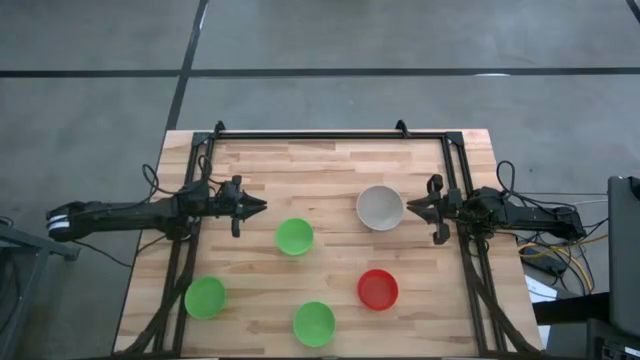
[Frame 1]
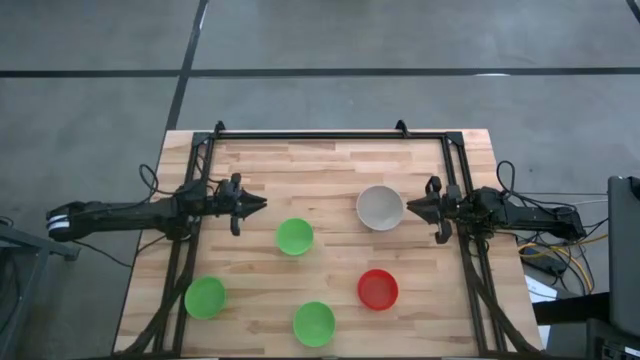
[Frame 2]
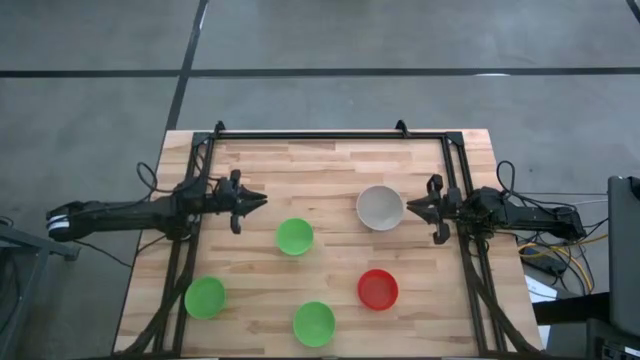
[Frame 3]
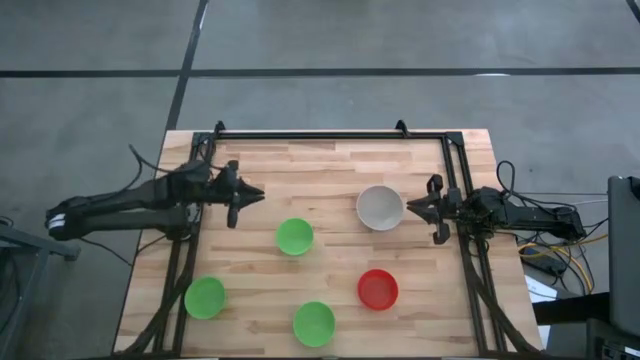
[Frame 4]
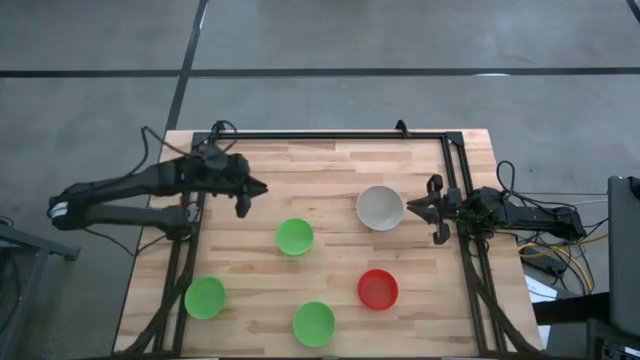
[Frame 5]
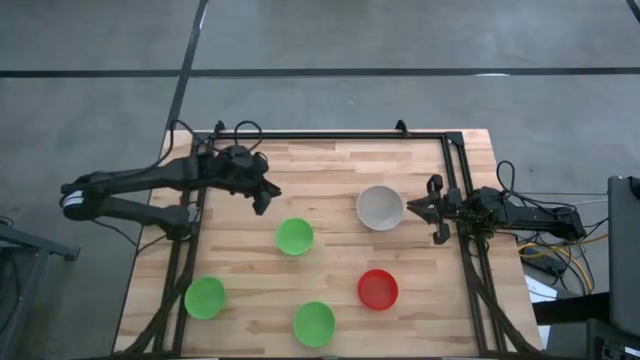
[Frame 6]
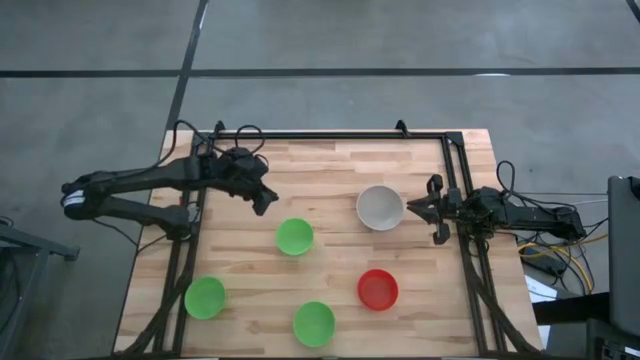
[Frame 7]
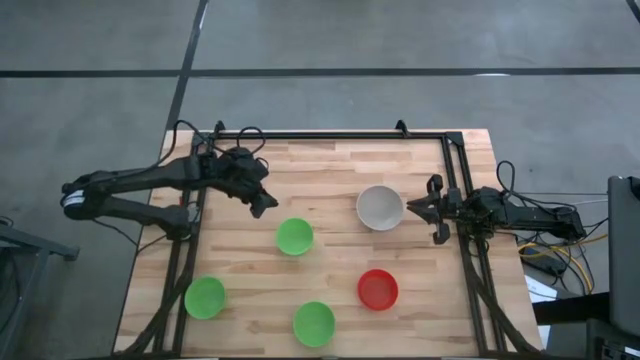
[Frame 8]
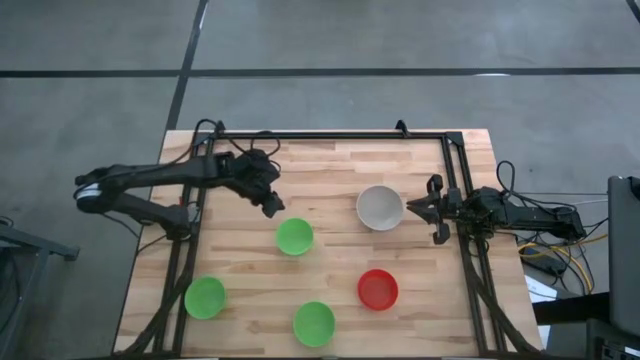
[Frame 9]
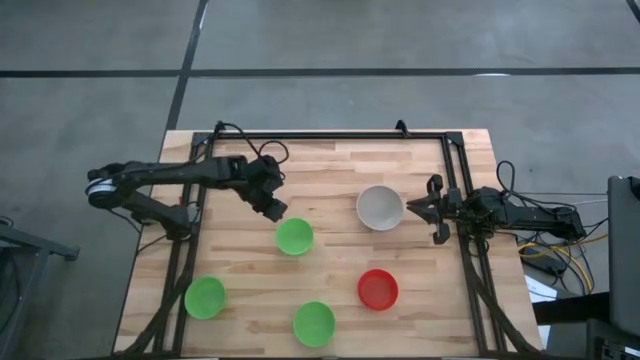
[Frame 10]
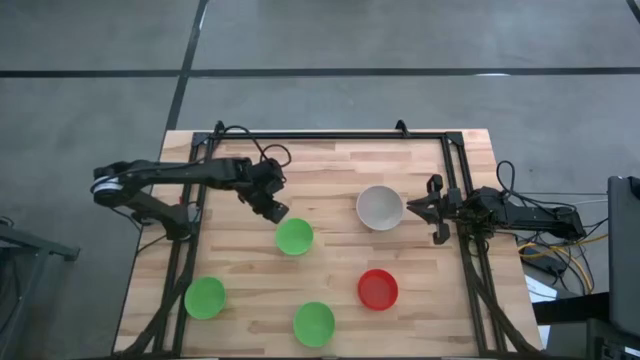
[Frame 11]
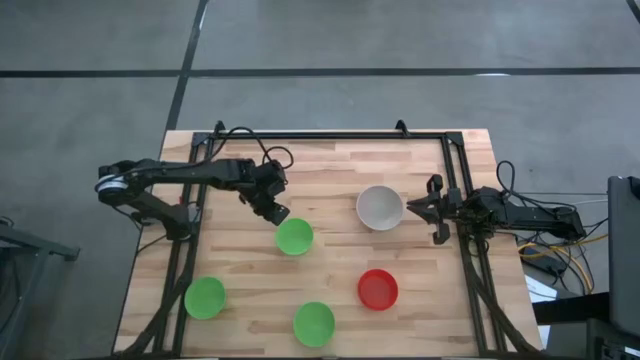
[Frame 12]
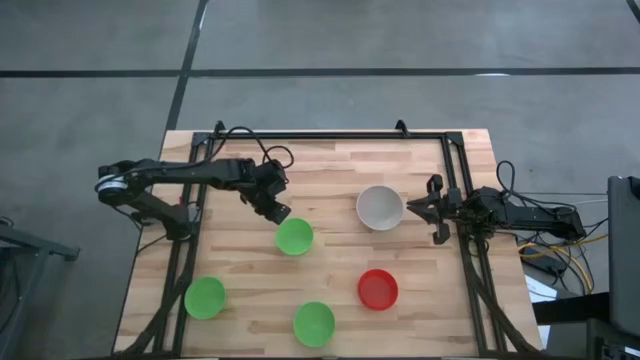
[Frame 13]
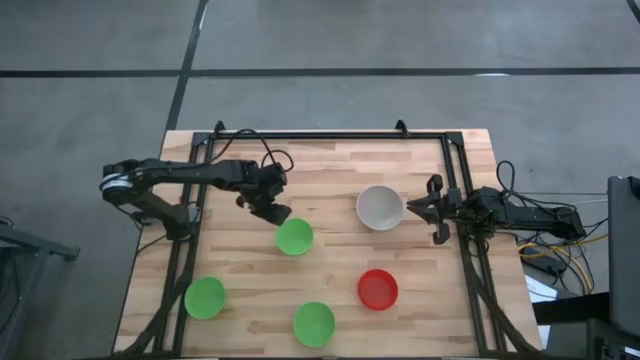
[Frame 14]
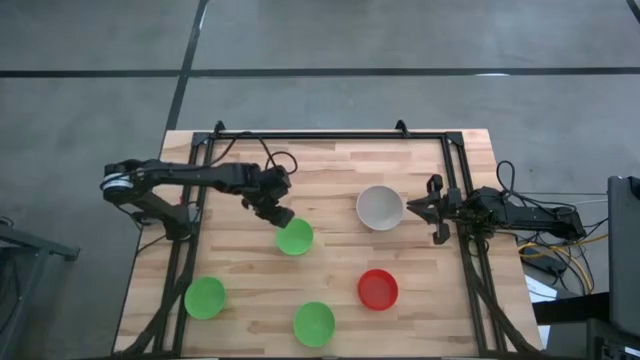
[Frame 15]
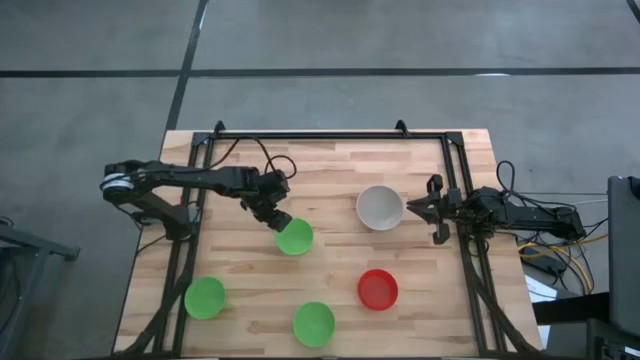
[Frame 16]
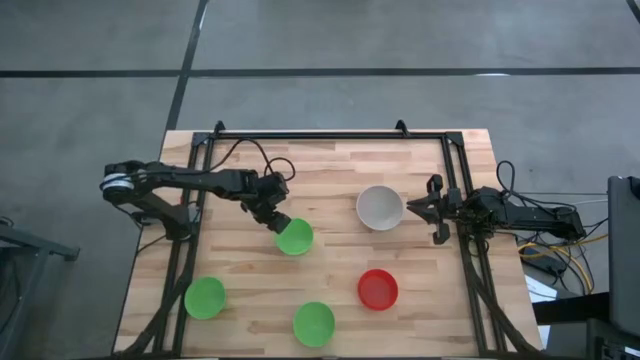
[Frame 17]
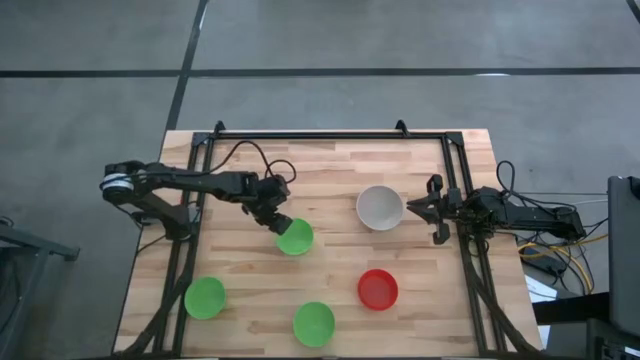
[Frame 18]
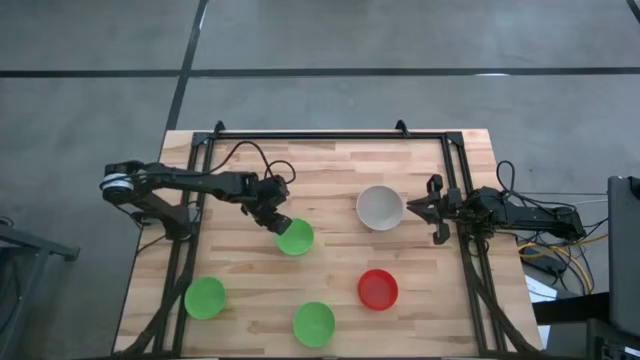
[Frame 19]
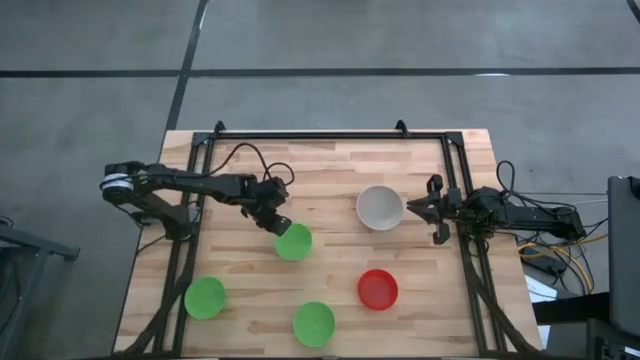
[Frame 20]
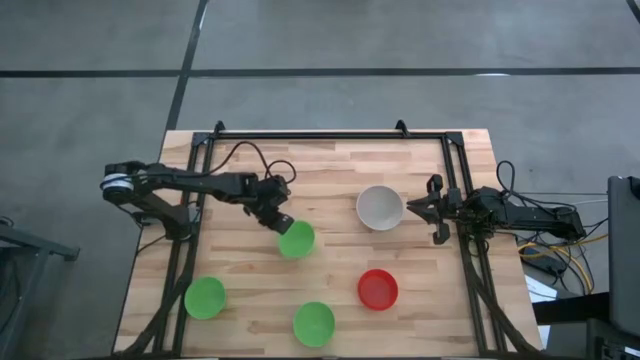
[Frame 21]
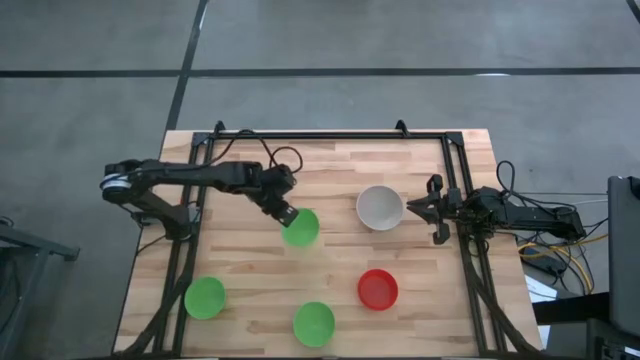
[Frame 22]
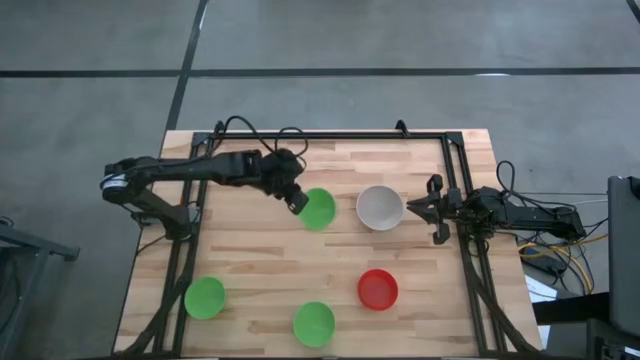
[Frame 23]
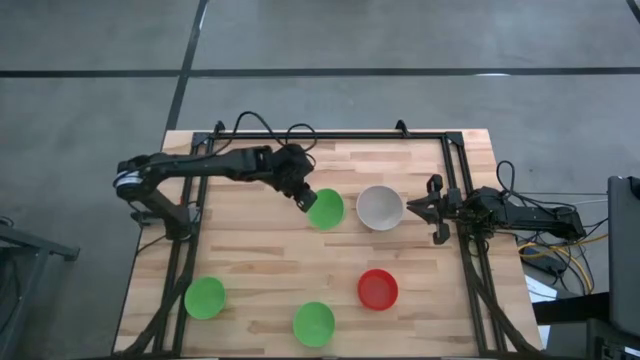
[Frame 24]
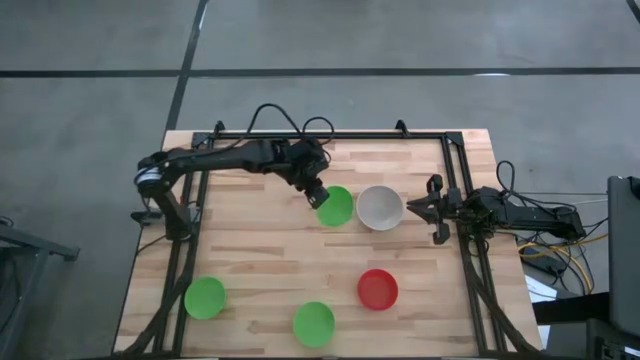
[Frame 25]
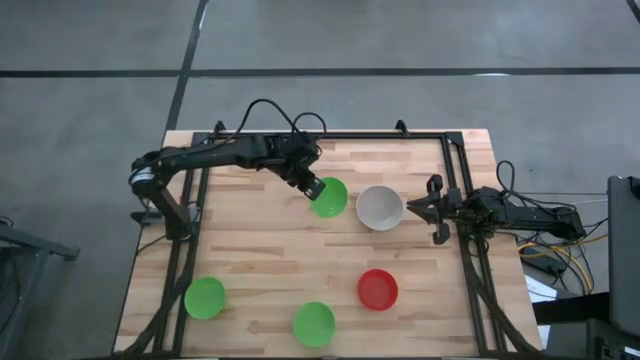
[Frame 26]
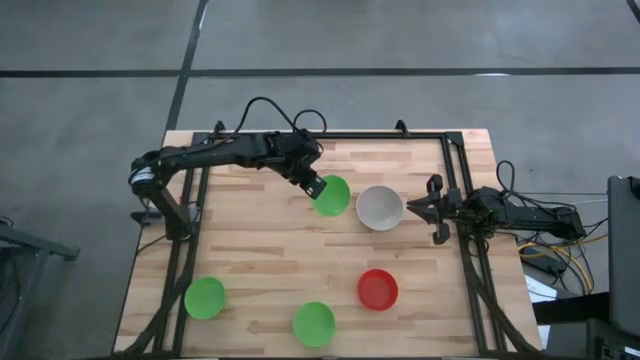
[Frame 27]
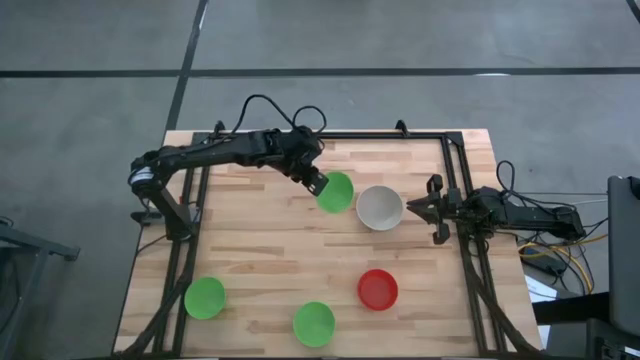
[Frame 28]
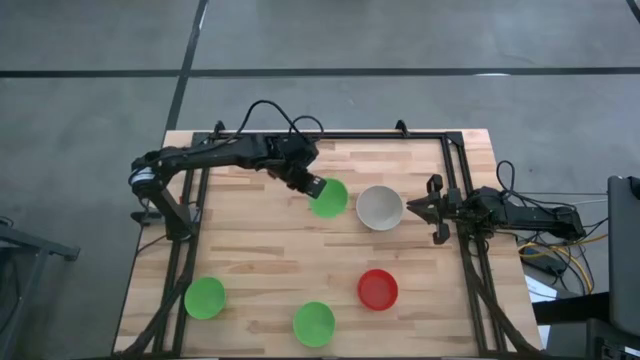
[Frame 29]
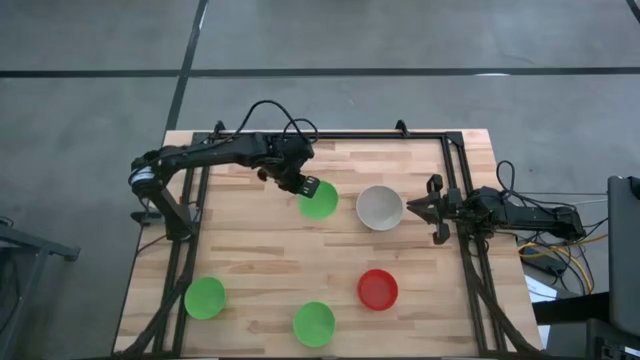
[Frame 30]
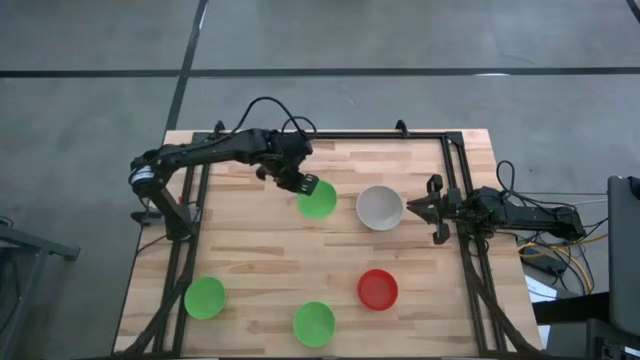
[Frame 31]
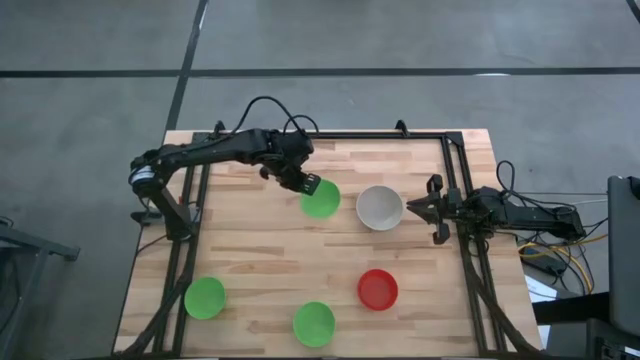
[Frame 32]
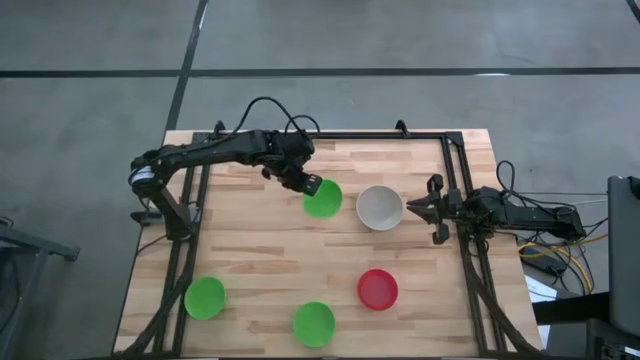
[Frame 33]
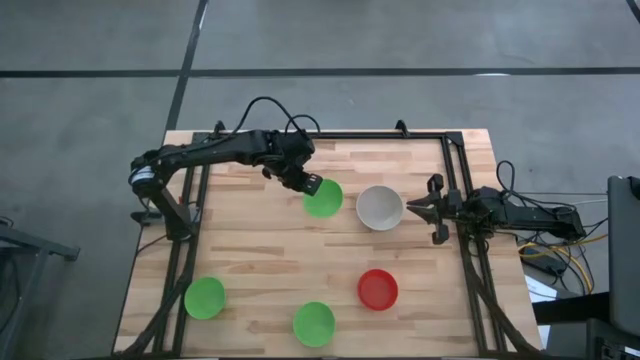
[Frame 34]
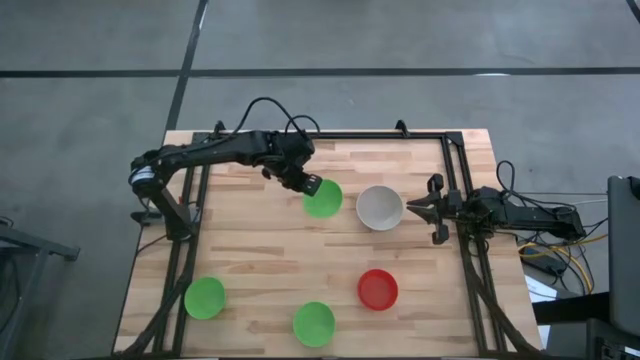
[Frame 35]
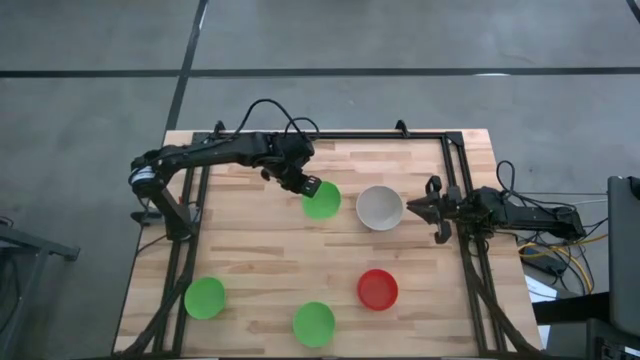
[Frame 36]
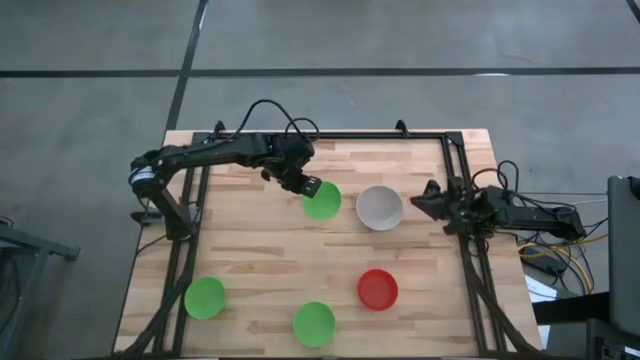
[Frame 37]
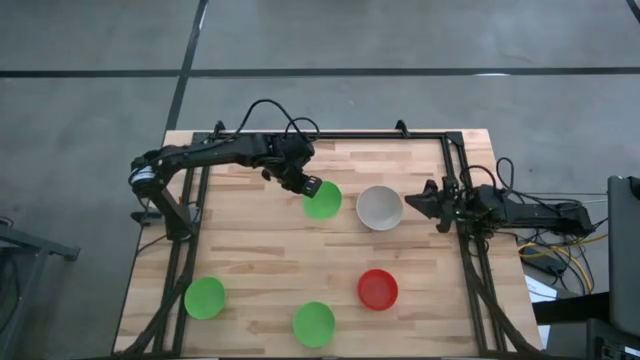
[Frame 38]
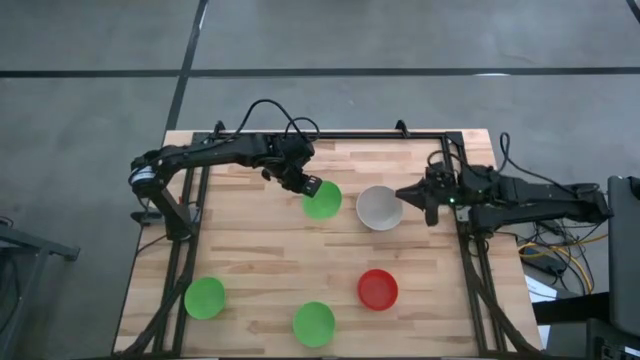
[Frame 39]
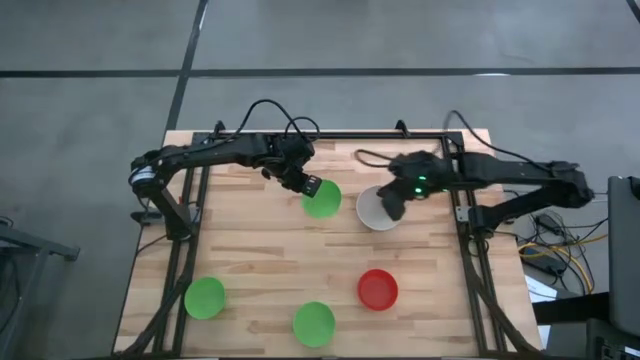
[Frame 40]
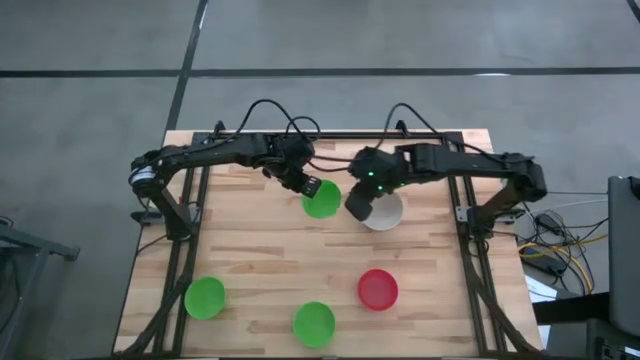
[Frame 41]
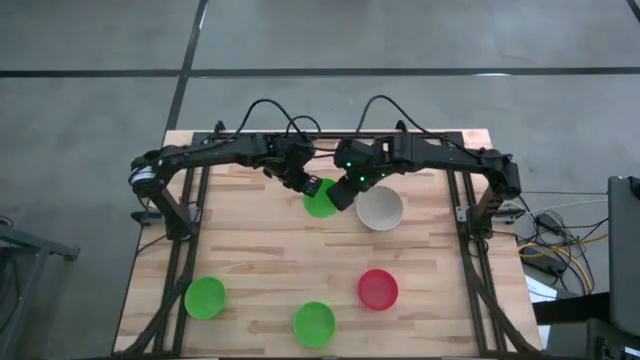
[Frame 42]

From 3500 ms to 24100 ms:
Stack the top green bowl on the grey bowl
